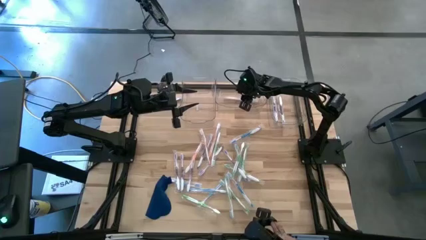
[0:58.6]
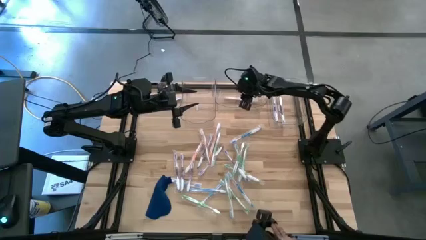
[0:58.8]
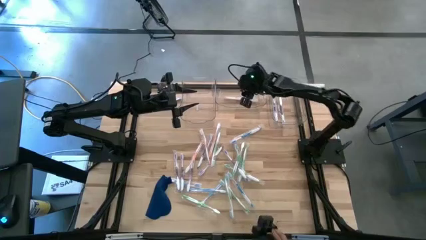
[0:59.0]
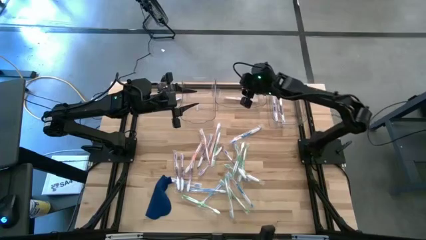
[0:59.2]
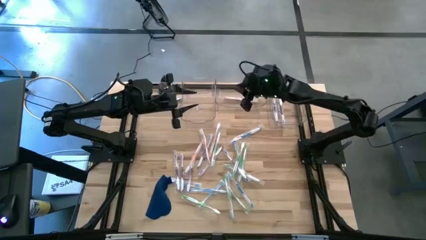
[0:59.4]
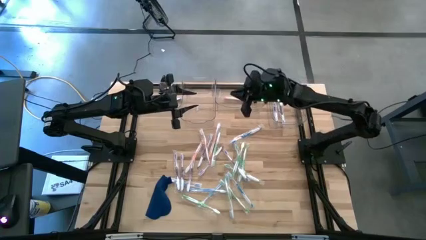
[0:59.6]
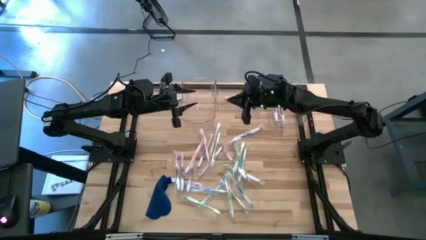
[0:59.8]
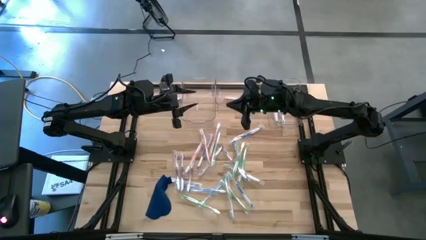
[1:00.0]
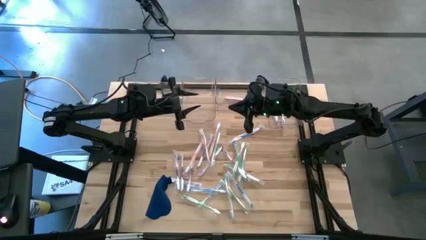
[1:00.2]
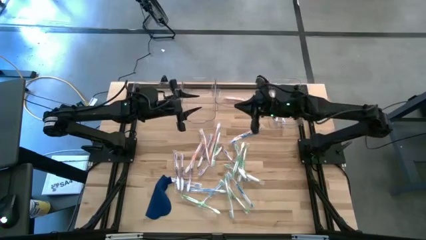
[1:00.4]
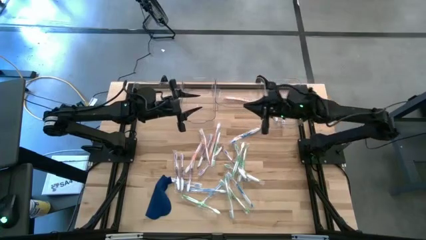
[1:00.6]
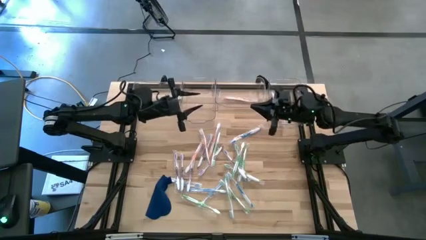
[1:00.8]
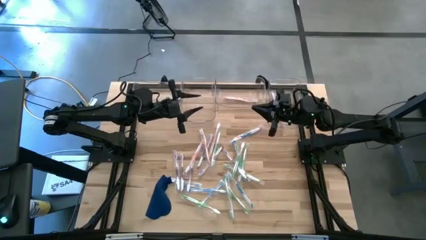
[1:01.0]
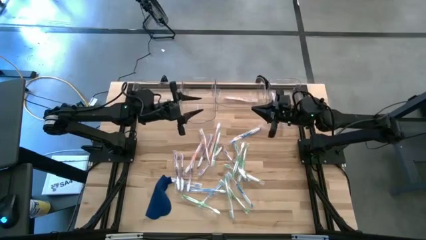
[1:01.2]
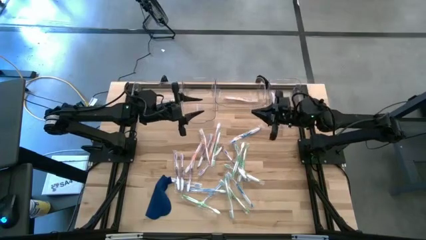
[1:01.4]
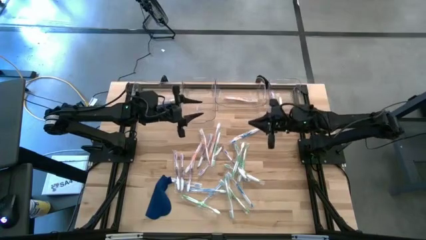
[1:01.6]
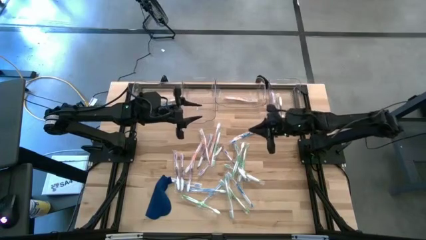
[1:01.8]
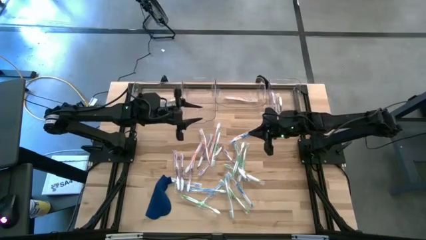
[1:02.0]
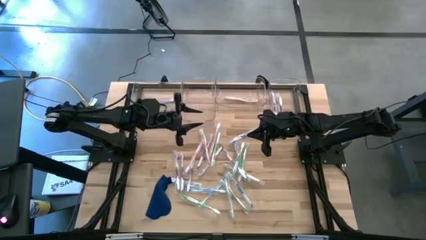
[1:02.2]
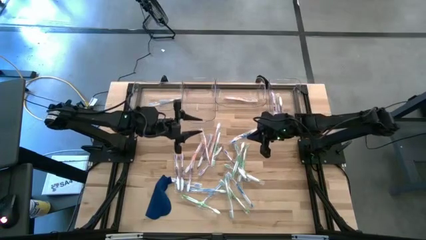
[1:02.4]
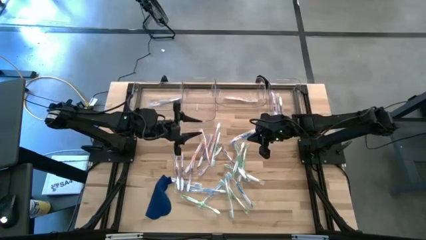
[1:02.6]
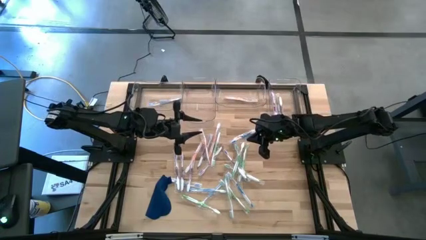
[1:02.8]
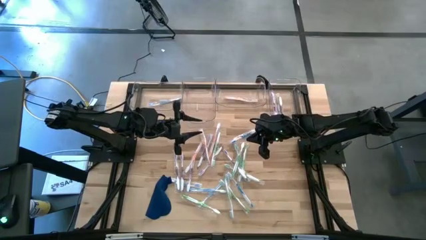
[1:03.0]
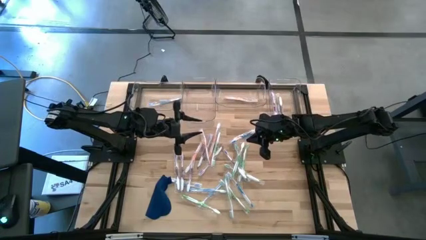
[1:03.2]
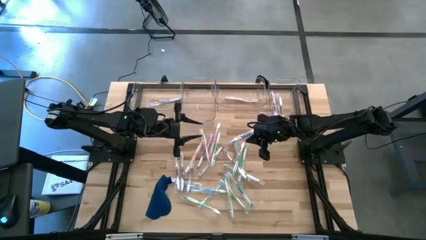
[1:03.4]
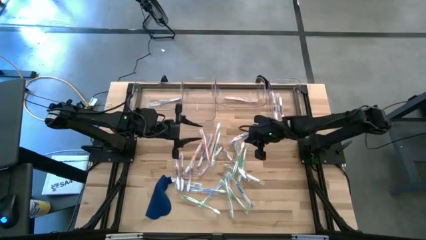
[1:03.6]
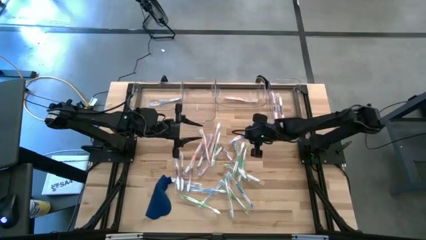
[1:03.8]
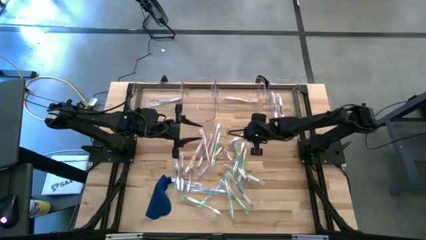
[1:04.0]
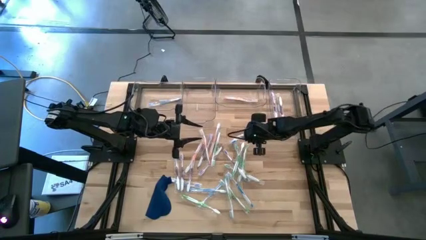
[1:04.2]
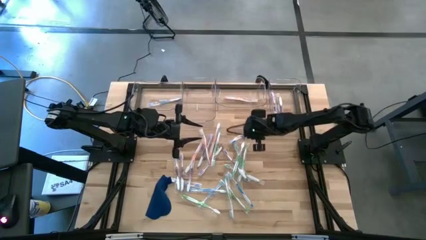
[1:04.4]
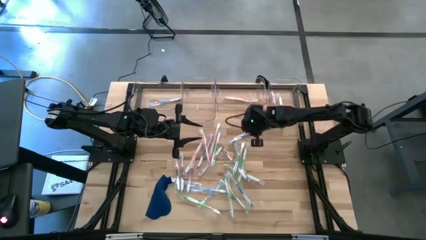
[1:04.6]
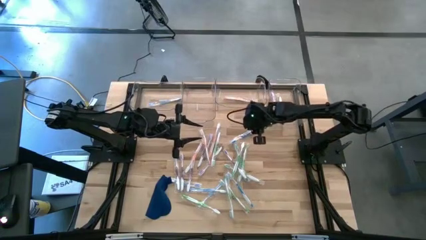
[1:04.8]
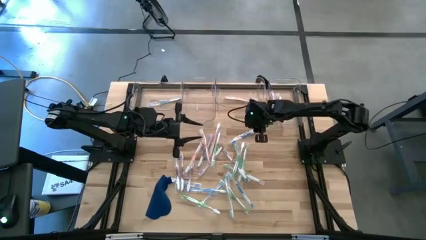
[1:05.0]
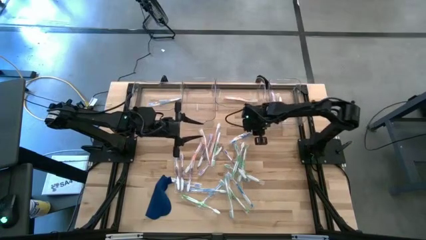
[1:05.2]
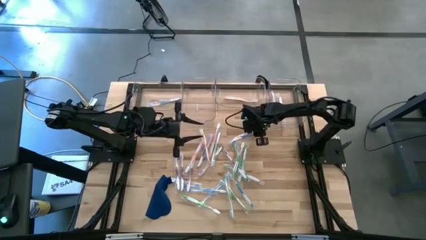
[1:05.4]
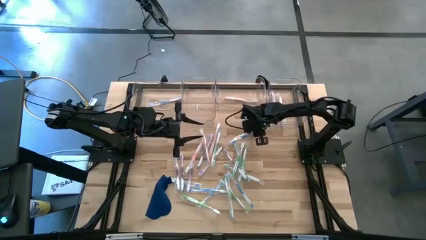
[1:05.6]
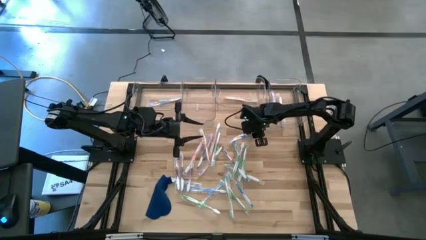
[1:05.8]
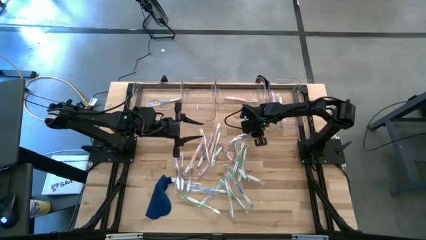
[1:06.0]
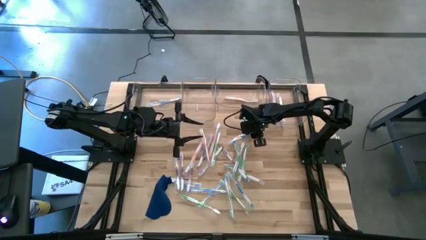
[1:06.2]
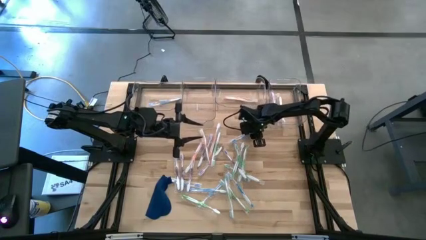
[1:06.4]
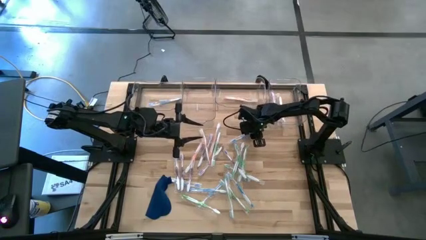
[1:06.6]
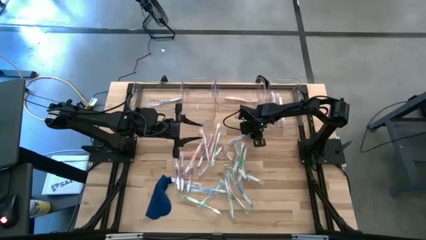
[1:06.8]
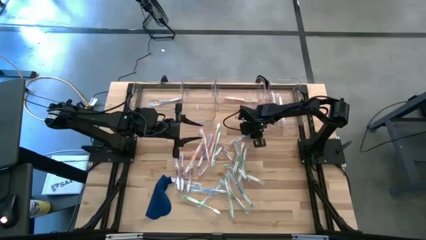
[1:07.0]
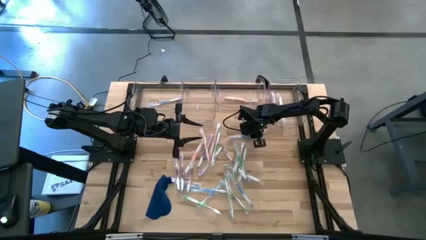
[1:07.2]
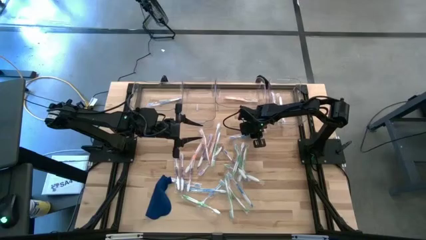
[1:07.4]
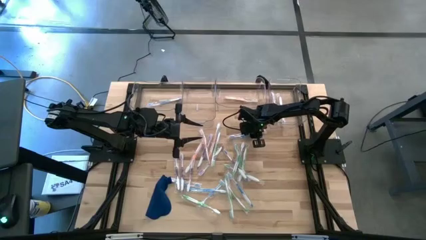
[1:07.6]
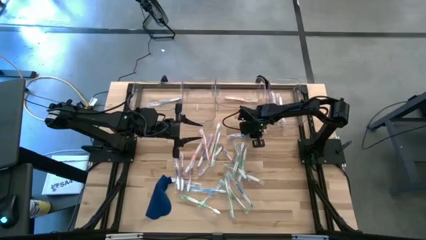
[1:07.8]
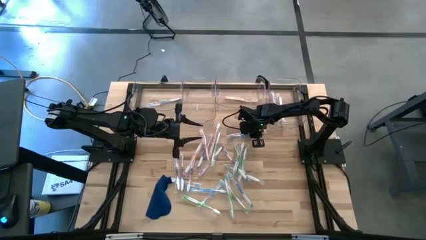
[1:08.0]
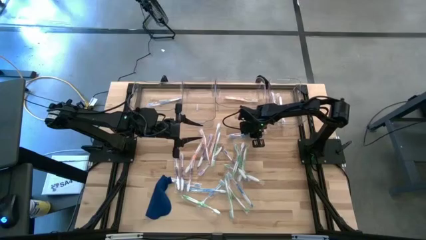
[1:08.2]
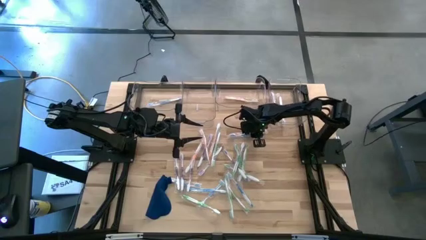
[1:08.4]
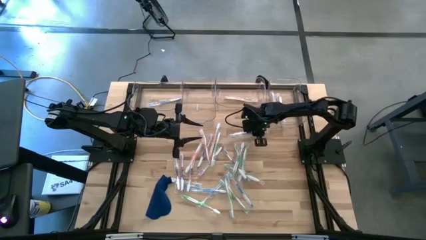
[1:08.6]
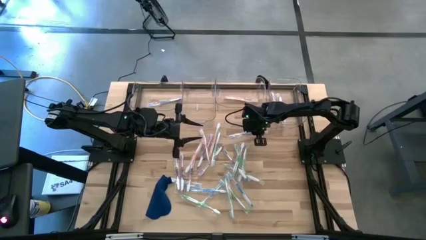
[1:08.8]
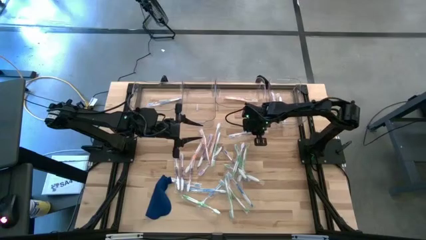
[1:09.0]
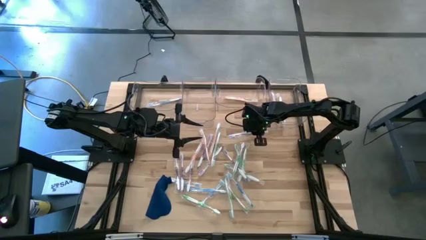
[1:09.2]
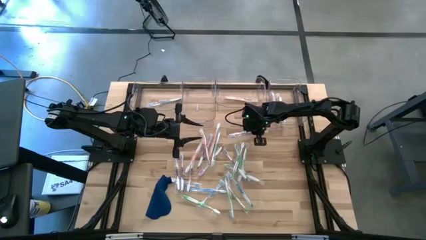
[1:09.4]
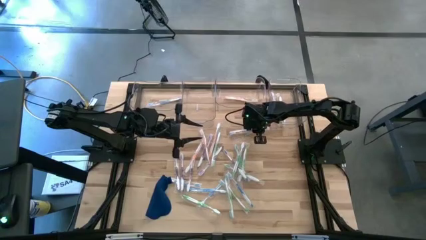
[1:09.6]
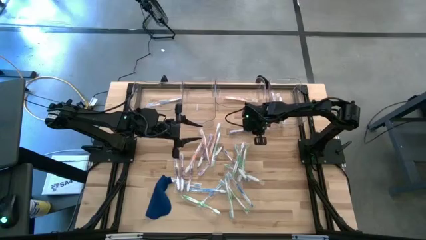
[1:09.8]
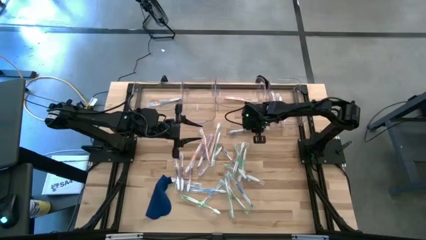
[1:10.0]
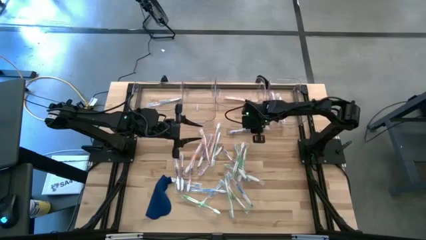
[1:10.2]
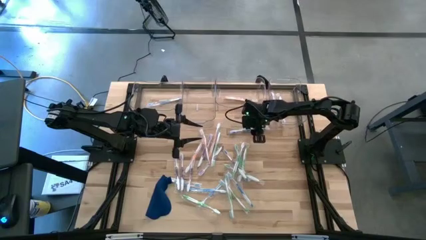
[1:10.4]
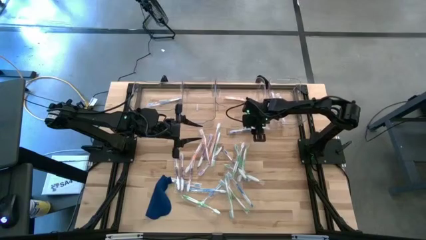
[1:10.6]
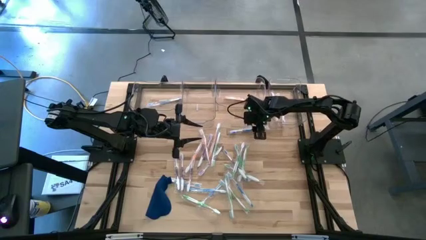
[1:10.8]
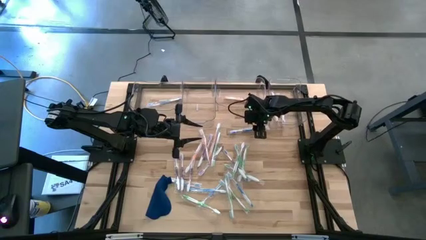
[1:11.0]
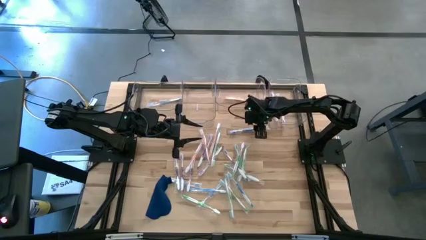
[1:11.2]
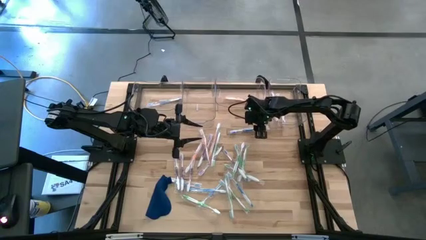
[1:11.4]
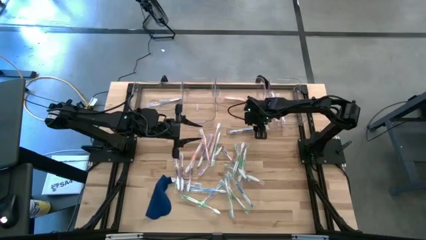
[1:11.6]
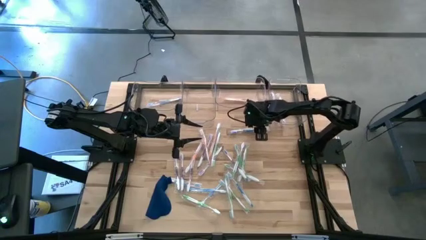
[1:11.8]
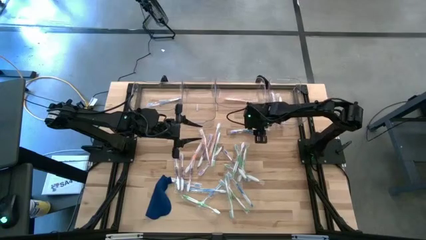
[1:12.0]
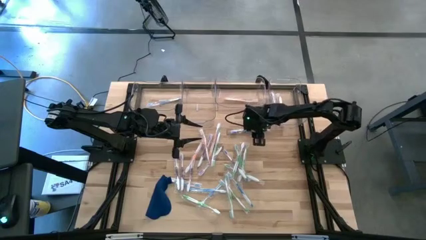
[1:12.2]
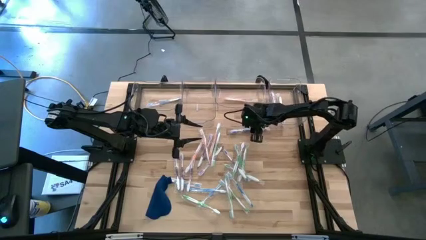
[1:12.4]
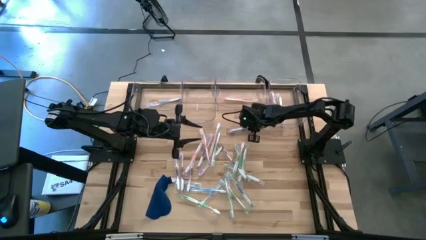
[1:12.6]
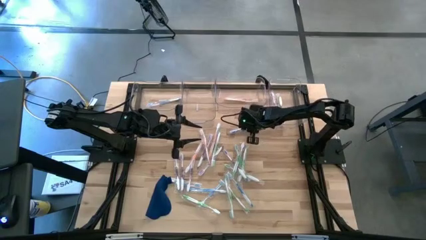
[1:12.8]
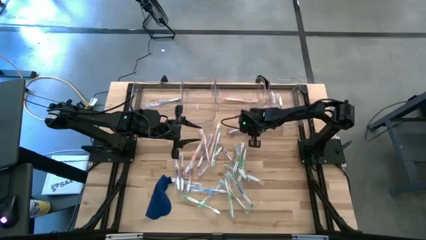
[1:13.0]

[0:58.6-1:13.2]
Task: Pick & Place Toothbrushes
Put the blue toothbrush into the left transparent bin
